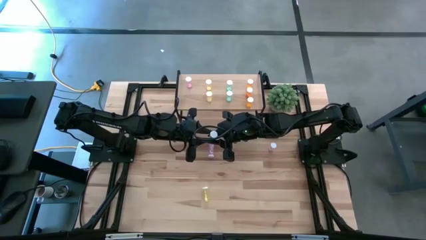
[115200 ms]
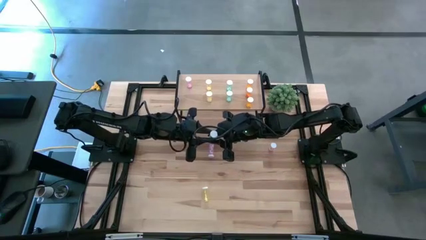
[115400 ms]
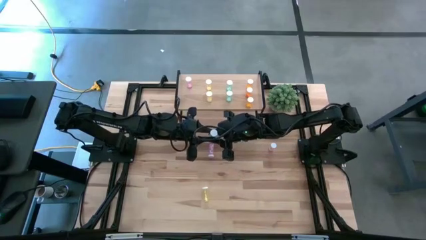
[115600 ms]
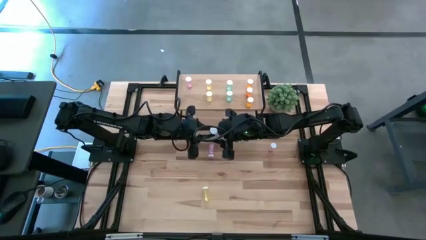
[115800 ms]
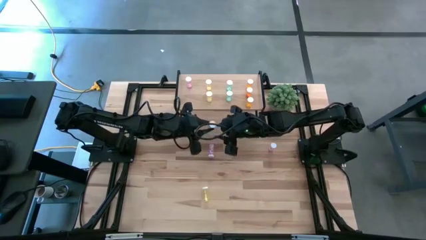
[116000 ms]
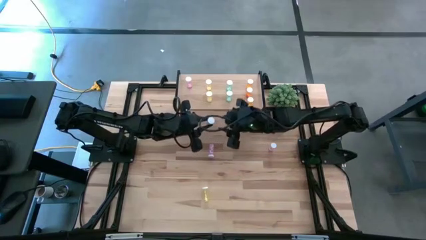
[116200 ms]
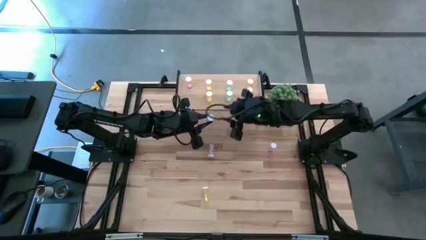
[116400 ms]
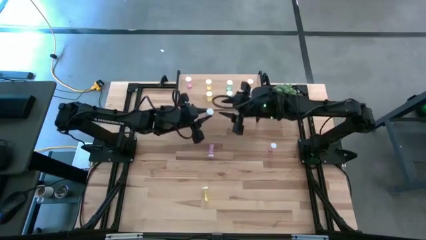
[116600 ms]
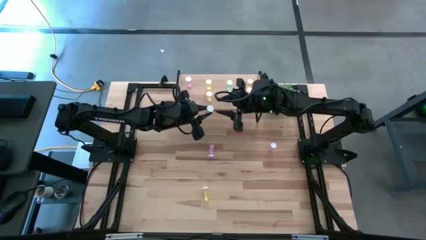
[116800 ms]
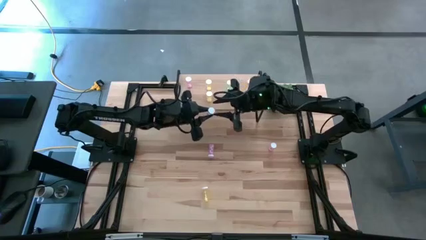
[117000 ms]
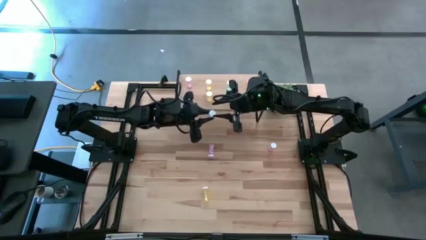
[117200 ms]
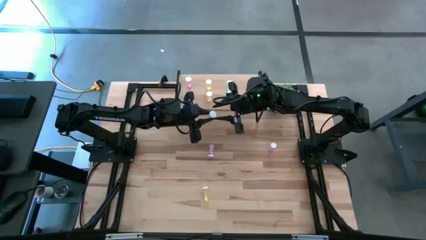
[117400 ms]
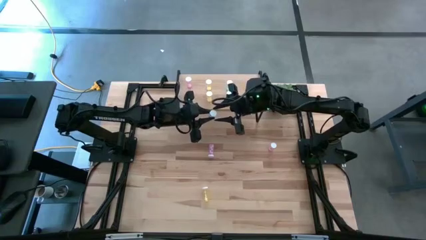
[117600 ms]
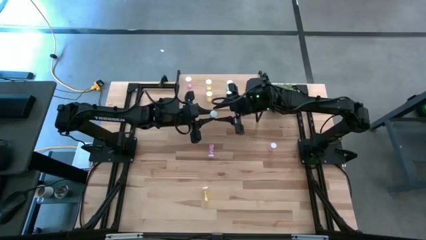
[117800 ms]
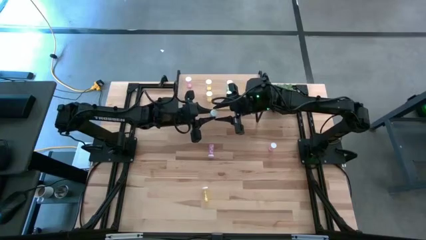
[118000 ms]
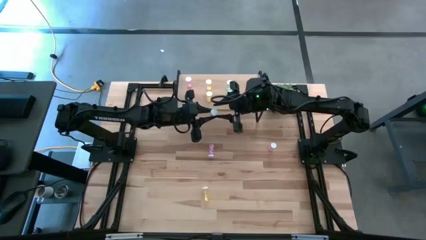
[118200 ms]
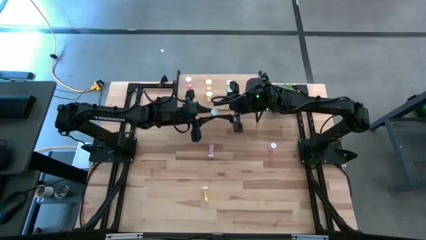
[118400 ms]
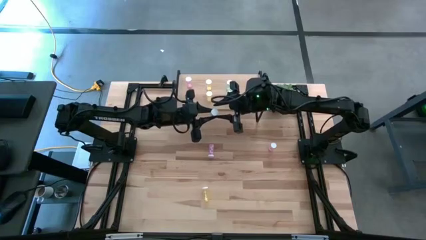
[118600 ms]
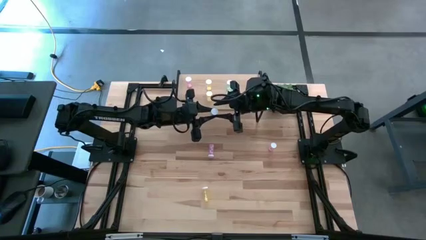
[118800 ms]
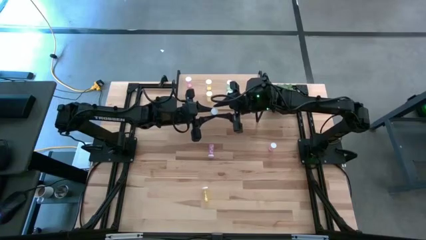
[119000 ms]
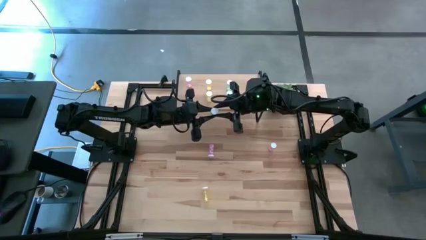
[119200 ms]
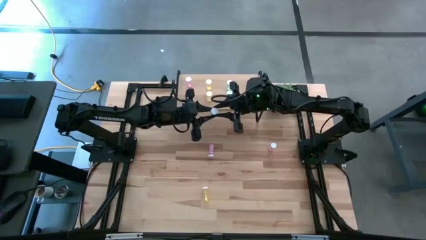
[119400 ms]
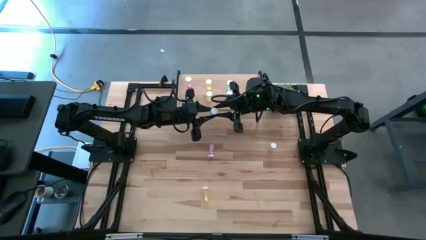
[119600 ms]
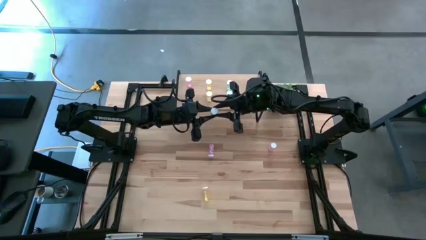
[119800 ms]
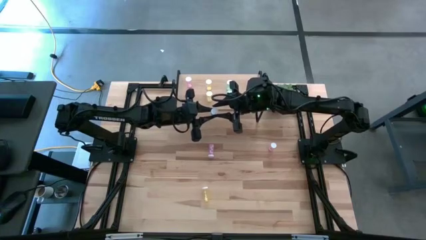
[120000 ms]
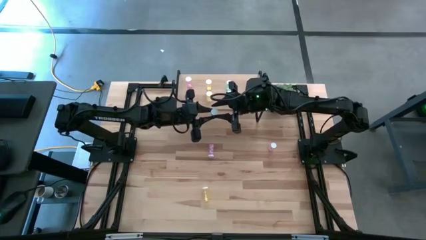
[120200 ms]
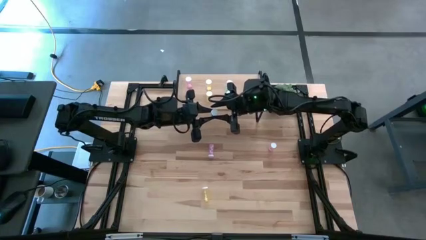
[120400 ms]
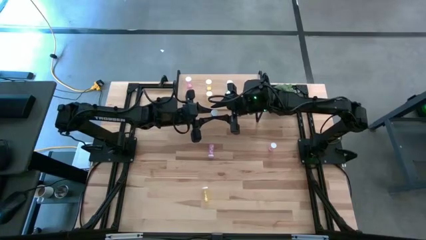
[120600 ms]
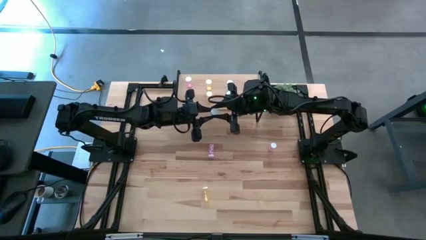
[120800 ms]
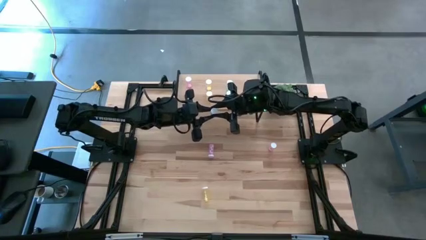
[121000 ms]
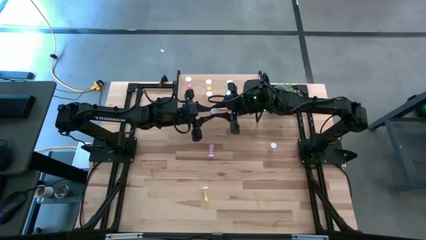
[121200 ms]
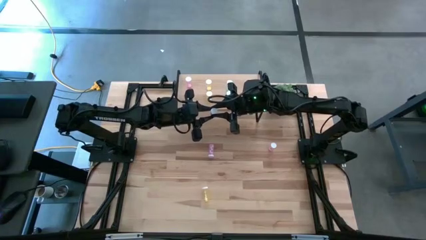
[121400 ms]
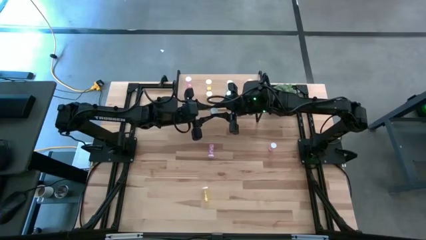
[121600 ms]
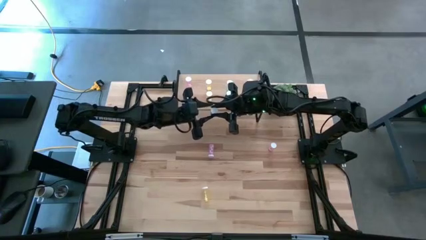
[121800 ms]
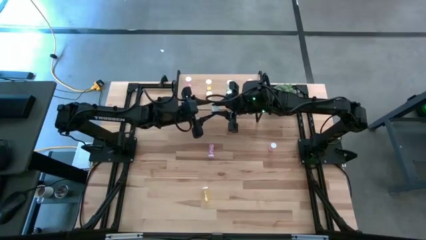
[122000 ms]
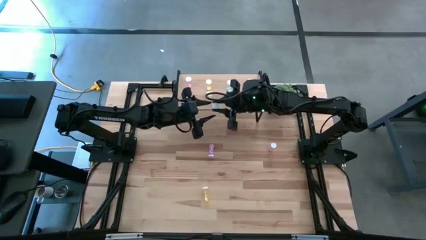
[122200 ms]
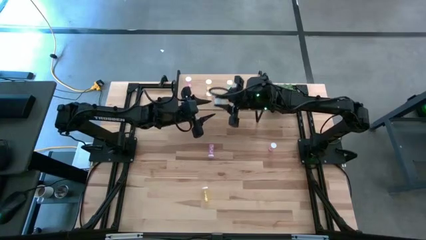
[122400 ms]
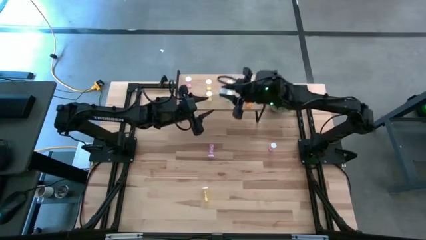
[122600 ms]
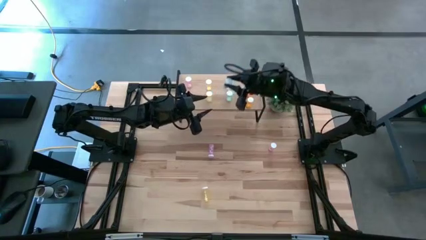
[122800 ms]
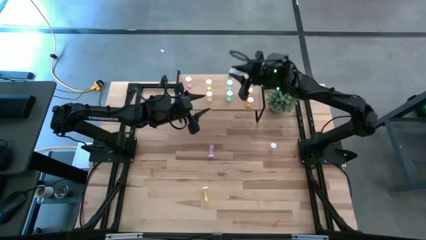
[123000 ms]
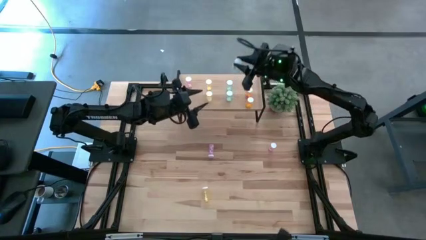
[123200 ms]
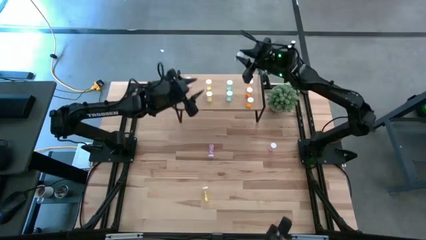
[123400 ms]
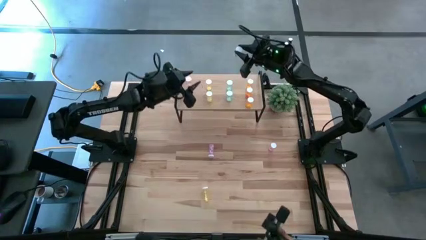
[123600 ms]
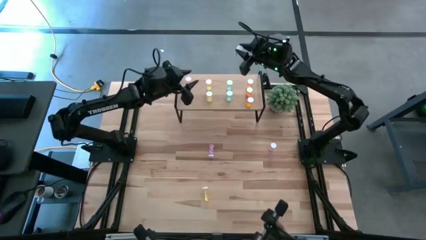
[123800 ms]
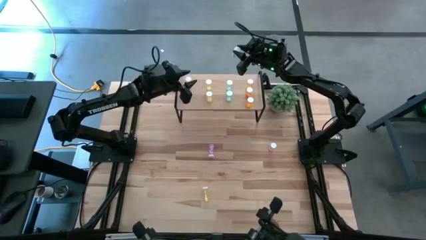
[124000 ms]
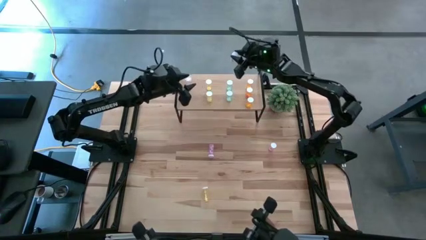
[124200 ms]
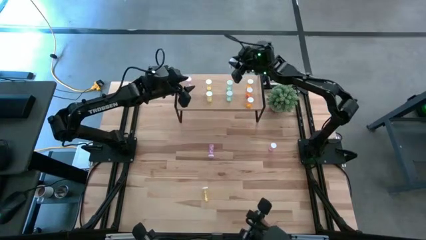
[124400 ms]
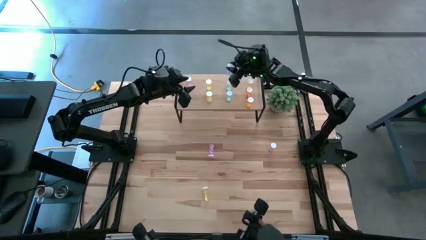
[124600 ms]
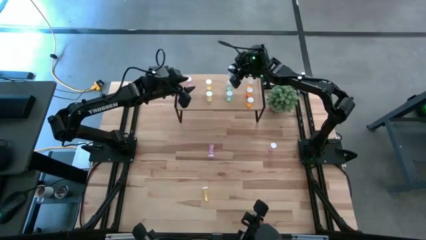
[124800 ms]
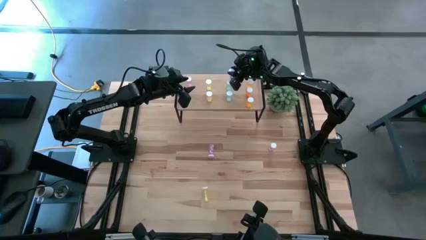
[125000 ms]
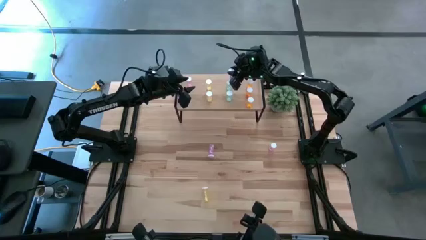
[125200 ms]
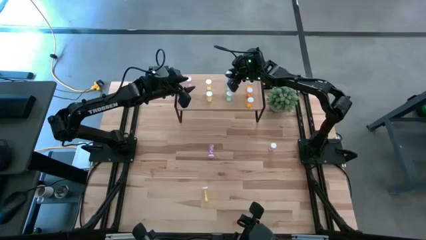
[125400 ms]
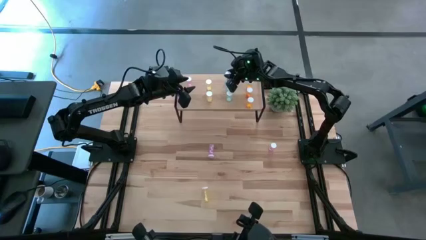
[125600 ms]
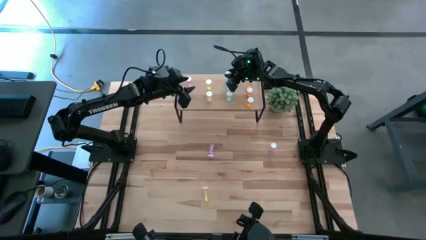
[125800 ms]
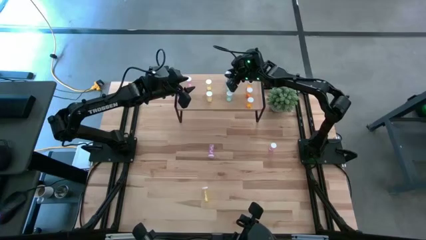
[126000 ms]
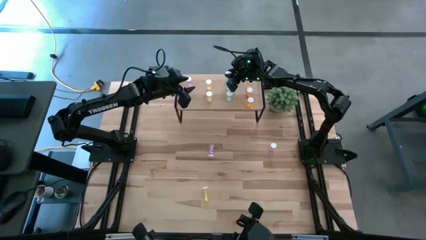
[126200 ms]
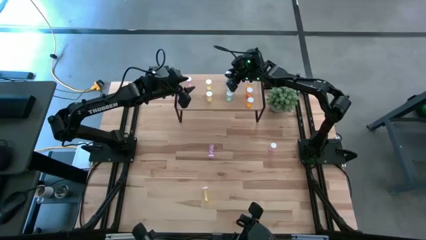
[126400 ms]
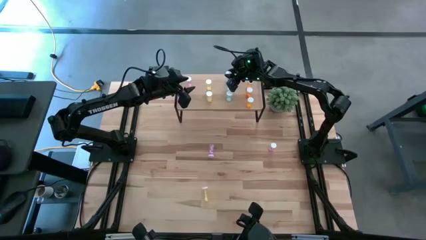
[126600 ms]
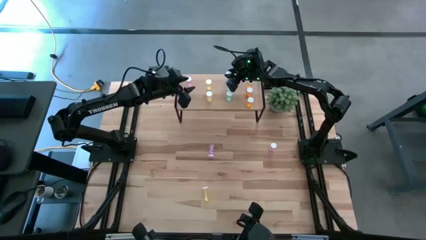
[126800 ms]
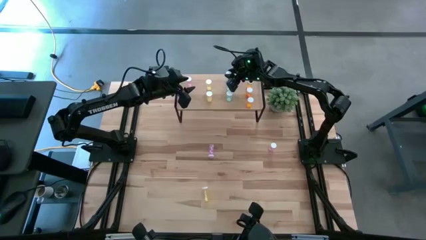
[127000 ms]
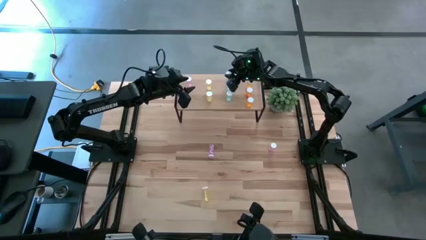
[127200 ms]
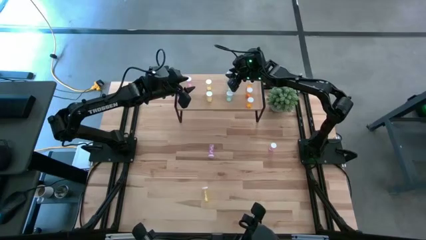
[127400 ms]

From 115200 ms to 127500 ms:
Task: Pick and place medicine bottles onto shelf by color
Put the blue pill bottle aligned with the other blue pill bottles on the shelf

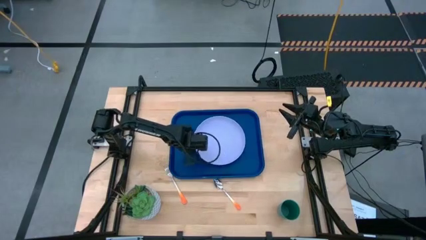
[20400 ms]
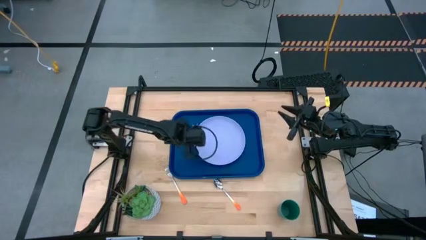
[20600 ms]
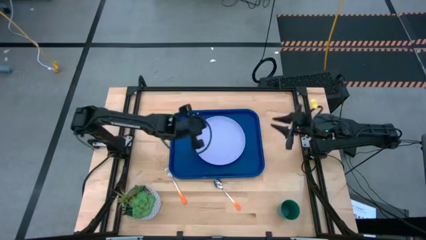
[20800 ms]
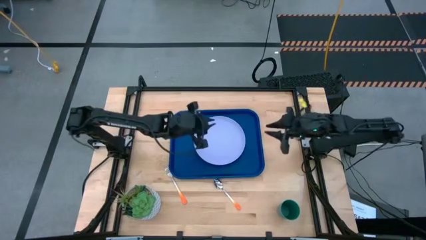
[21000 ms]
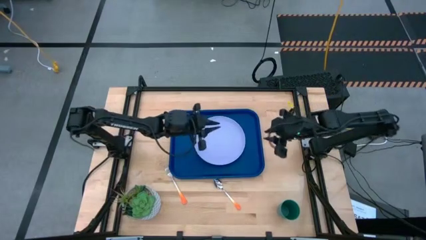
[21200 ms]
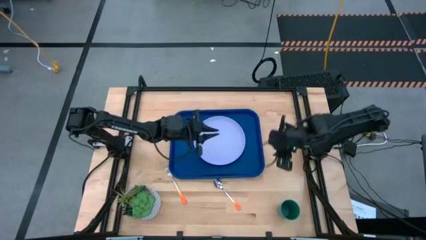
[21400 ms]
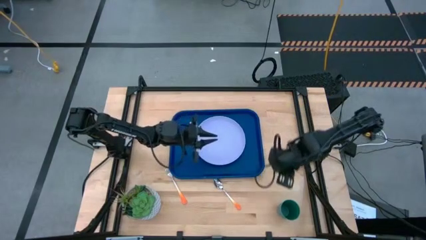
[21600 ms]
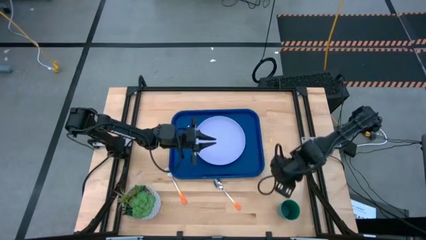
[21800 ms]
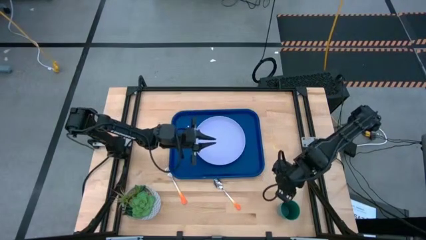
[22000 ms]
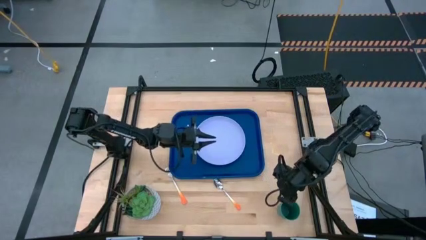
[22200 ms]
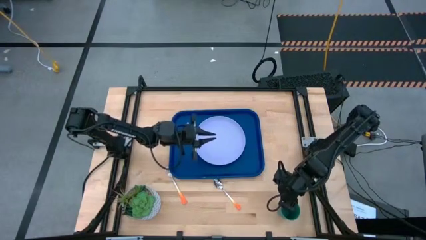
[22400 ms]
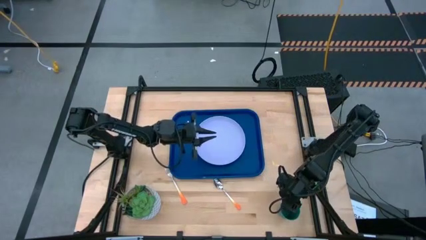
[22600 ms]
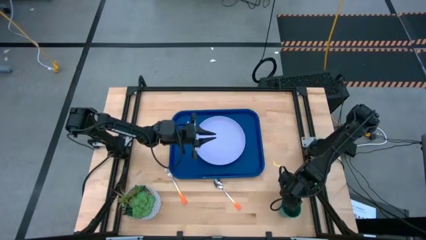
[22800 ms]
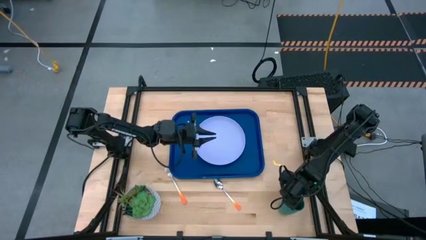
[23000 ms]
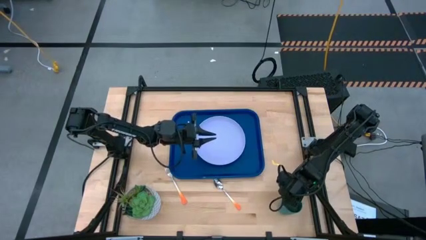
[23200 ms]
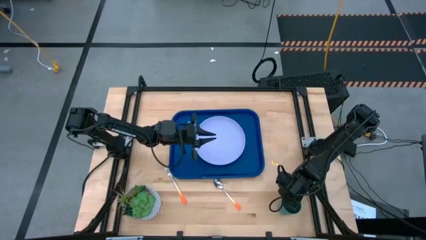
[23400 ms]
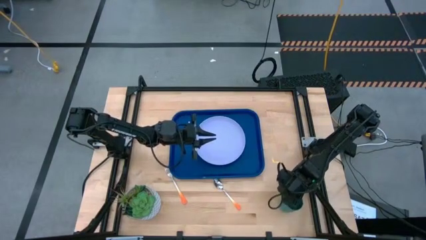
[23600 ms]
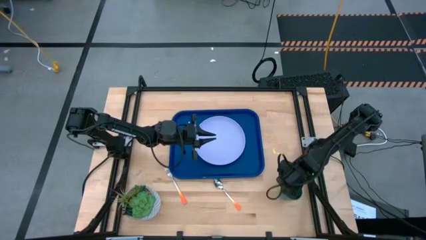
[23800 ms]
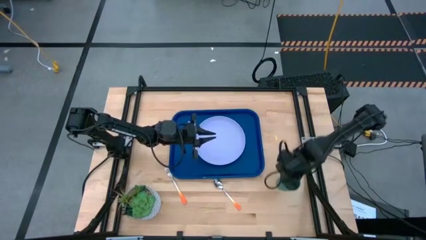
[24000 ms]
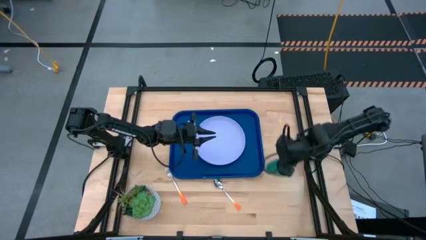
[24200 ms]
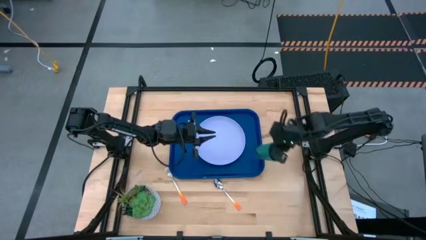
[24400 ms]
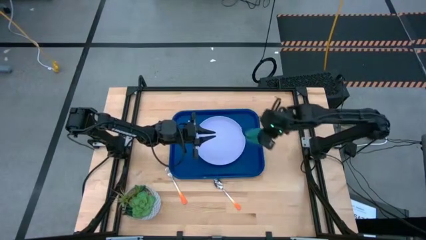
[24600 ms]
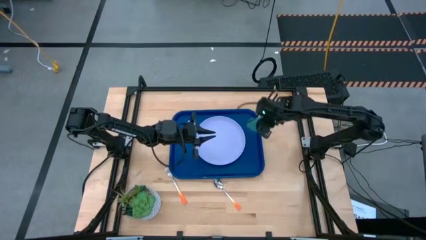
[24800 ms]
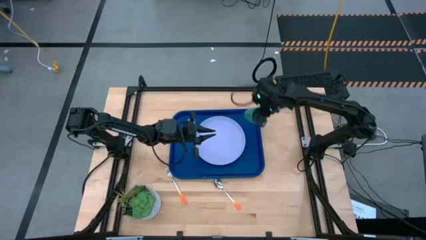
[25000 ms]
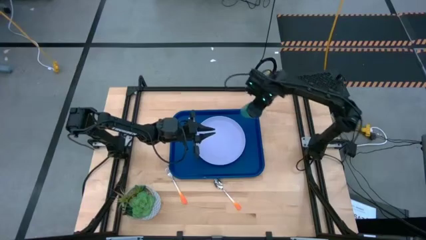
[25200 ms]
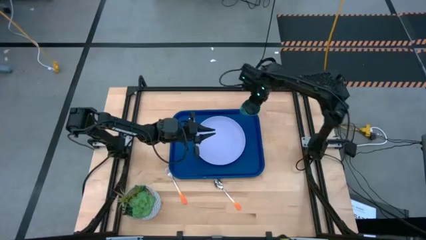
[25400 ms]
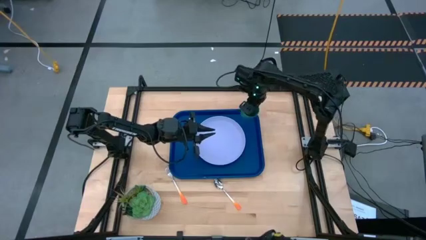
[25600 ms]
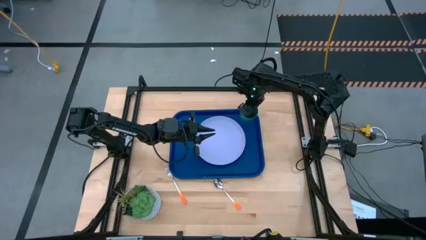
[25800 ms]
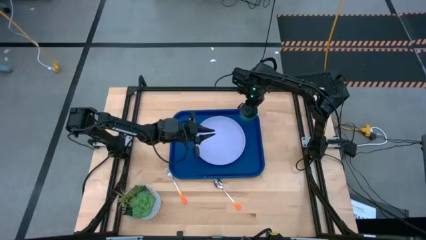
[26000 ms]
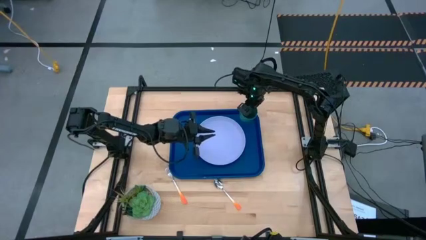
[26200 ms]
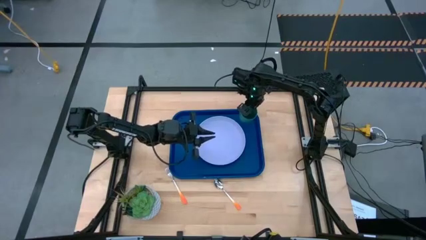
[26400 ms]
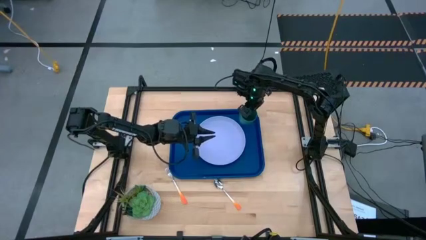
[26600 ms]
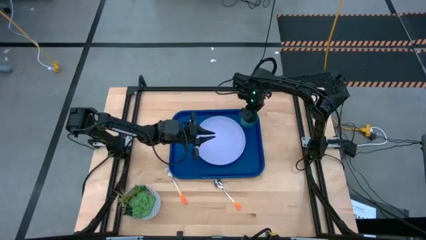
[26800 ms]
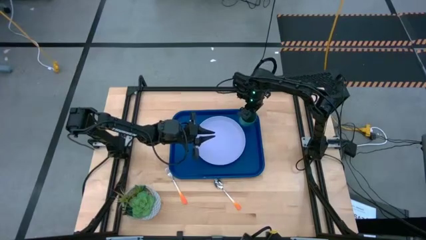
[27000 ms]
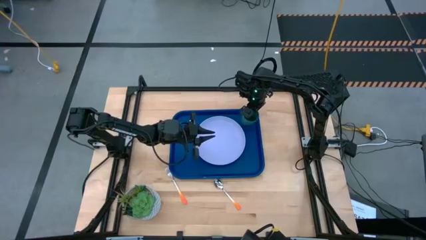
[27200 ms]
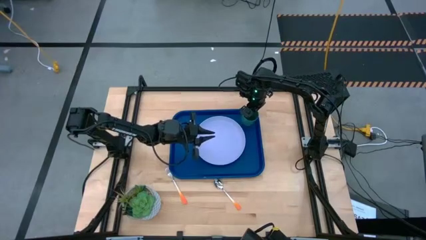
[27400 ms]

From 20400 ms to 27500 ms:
Task: Pick and place plate/cup/fork/spoon on tray
Put the green cup to the top right of the blue plate on the blue serving tray
